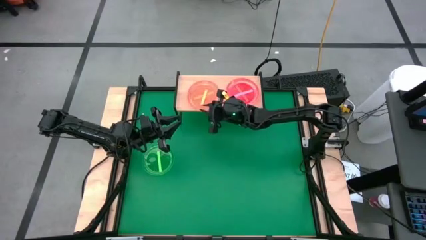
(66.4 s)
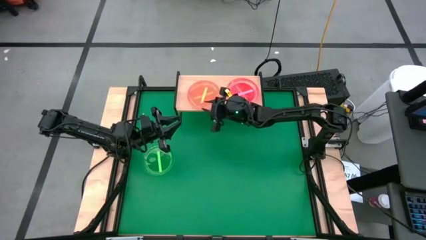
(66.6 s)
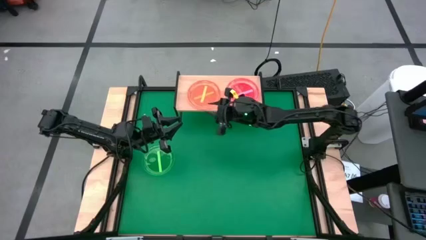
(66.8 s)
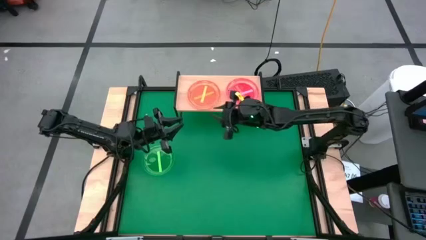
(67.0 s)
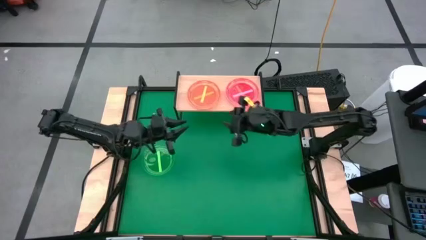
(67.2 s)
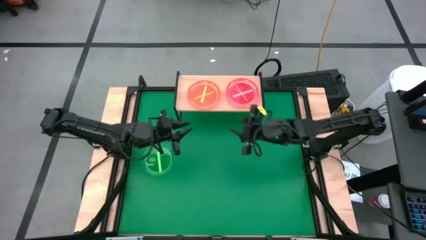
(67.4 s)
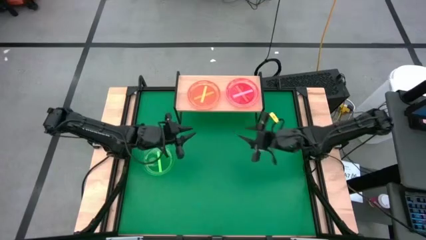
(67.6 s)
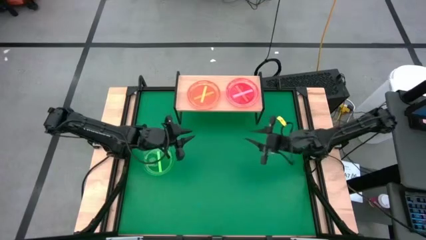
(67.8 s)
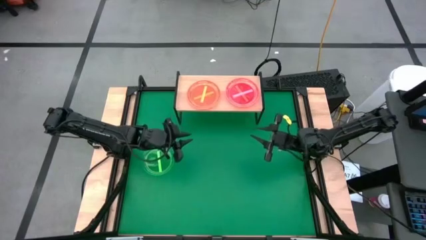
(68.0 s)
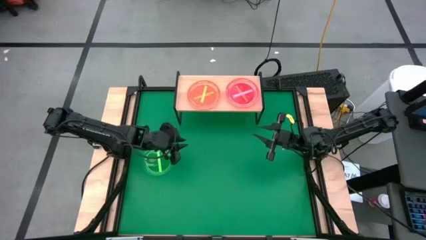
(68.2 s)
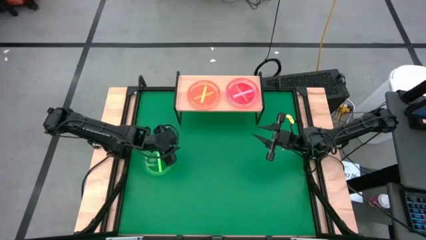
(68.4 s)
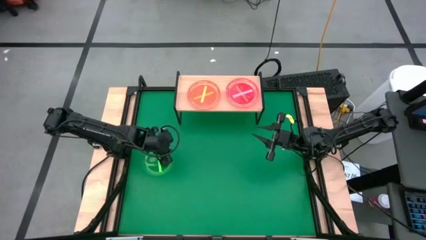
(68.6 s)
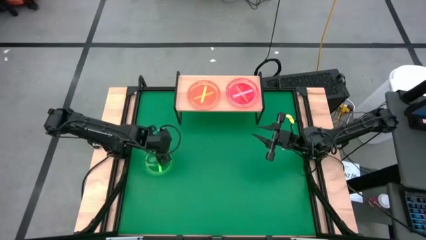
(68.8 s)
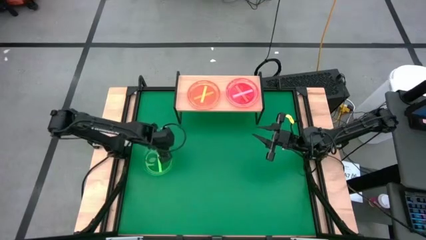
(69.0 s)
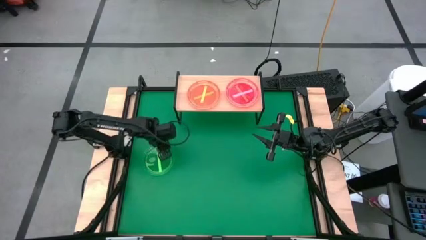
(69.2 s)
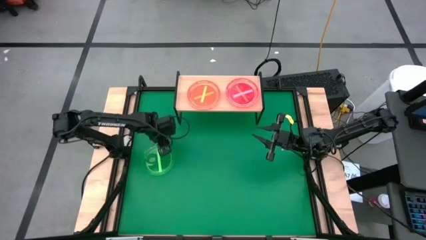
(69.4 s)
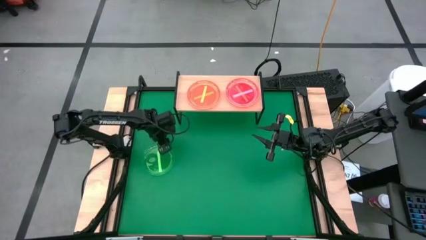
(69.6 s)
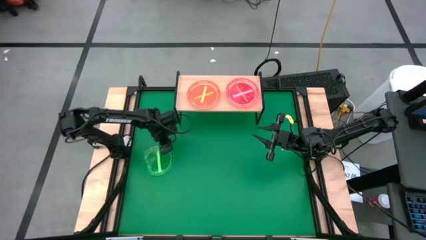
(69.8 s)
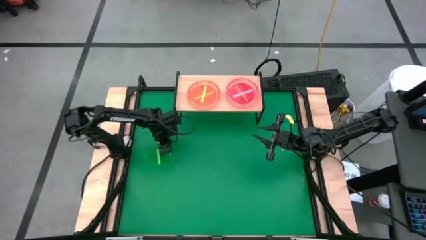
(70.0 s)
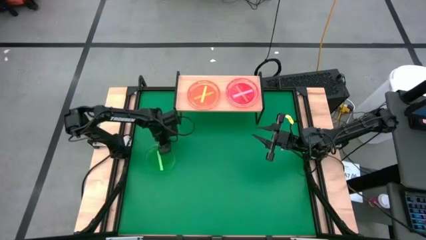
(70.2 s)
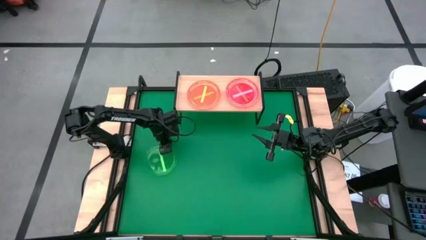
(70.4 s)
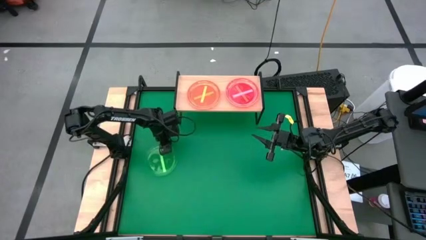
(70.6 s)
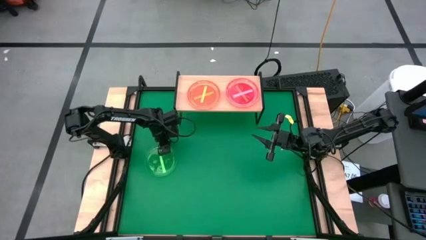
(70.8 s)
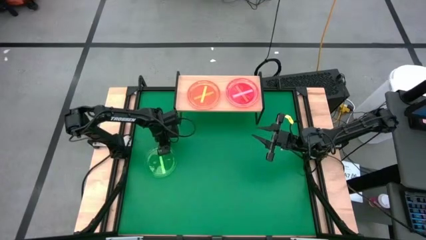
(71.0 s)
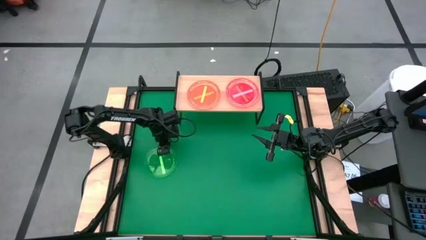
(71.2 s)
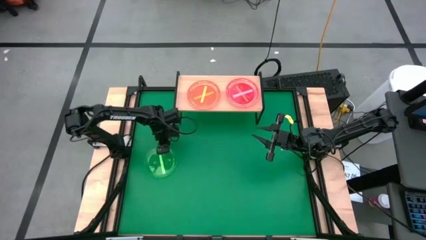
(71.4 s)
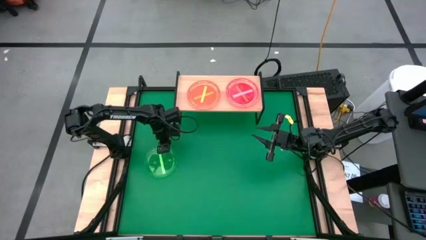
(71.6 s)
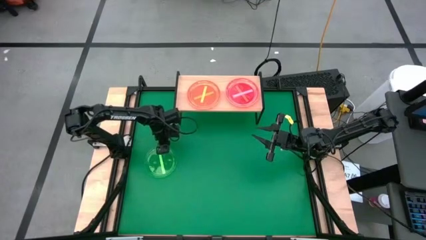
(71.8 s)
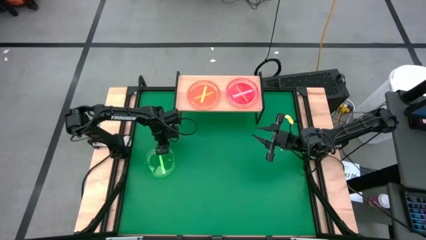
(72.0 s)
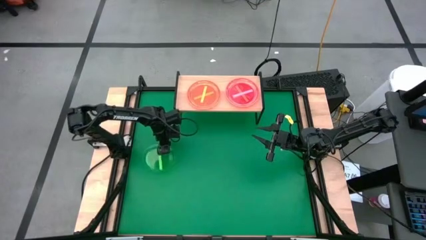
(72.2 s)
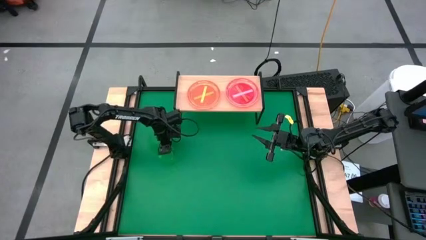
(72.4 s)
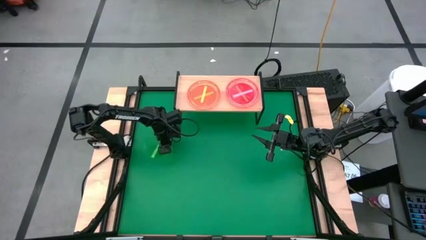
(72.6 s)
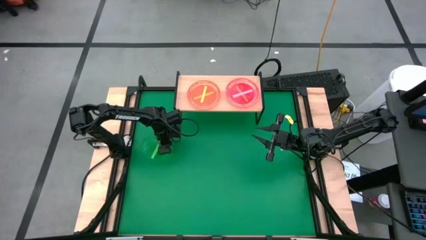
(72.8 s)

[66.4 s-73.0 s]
Task: Place and stack plates onto a shelf
Stack the green plate on top of the orange plate on the shelf

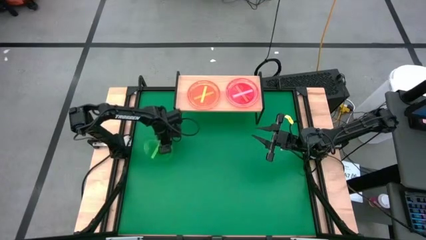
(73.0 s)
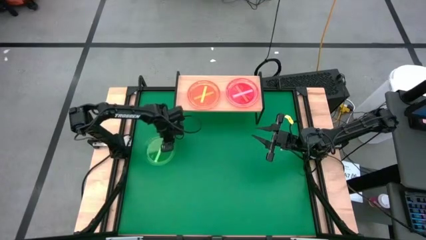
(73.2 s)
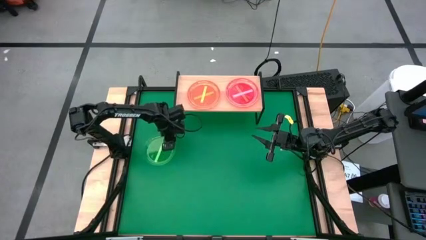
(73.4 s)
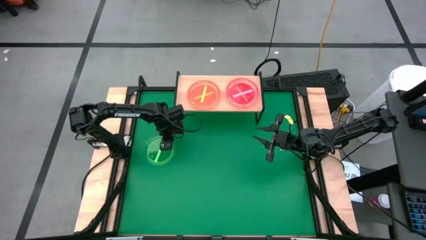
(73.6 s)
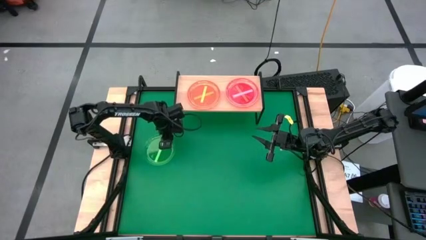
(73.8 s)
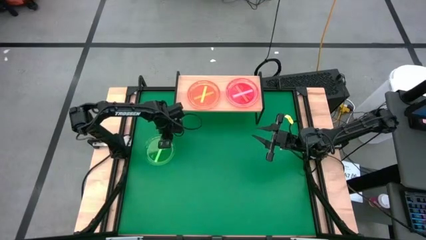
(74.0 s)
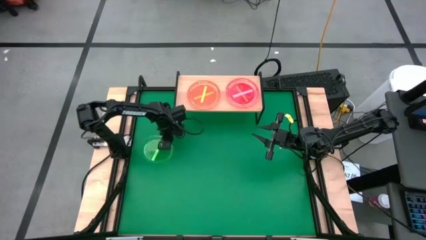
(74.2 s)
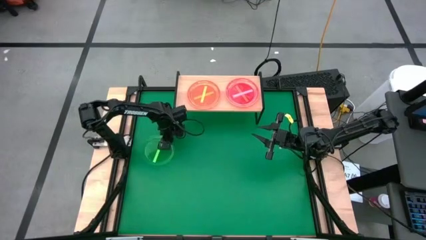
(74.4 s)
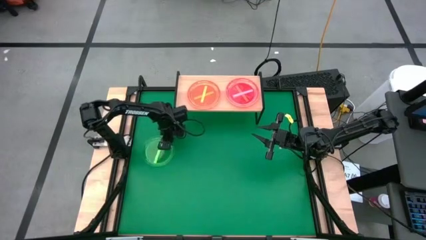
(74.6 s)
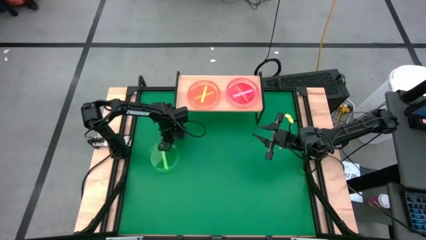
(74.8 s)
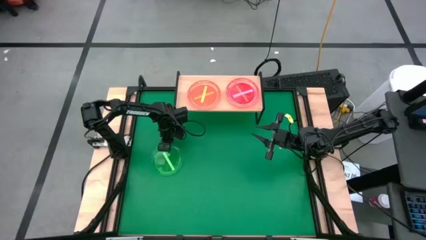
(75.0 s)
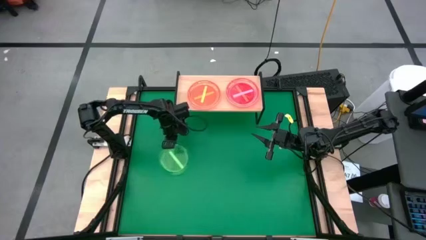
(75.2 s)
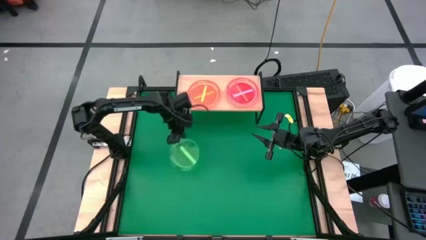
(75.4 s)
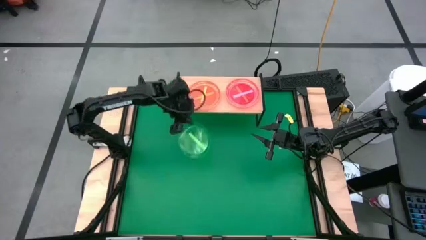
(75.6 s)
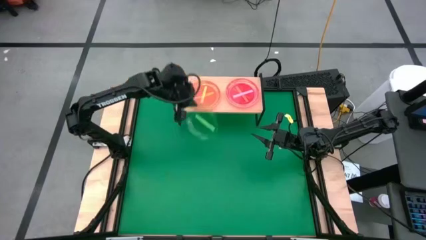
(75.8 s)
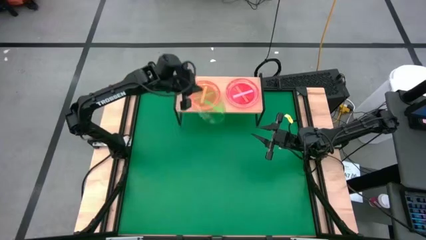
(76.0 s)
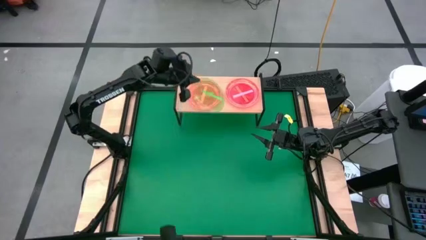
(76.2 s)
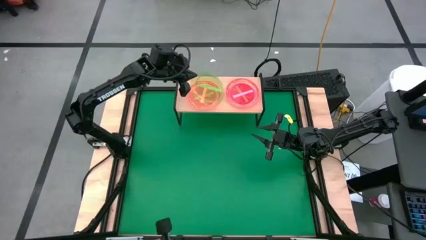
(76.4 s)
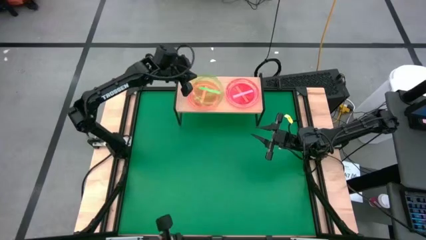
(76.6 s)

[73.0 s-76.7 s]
Stack the green plate on top of the orange plate on the shelf
